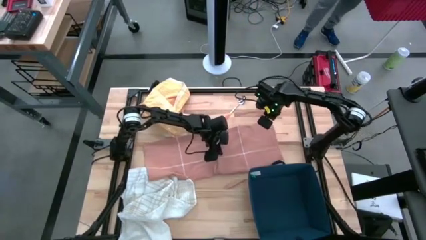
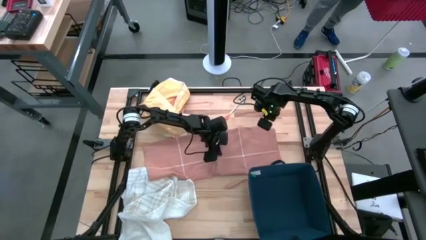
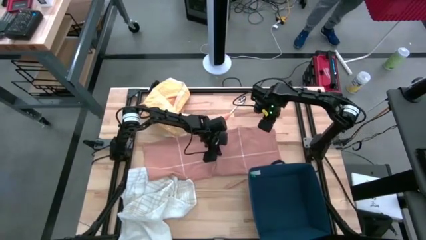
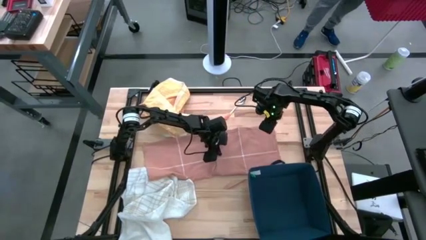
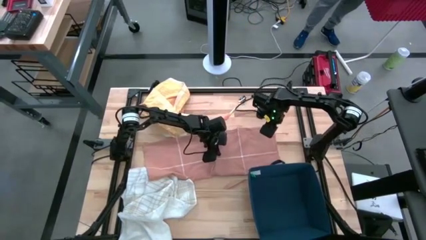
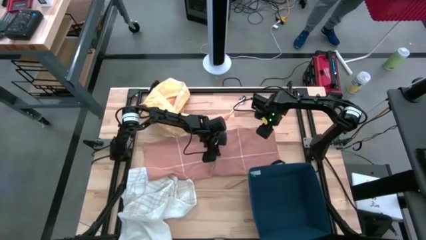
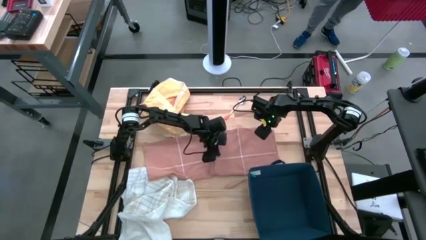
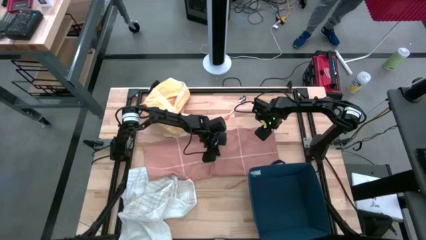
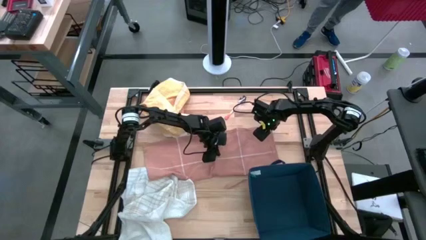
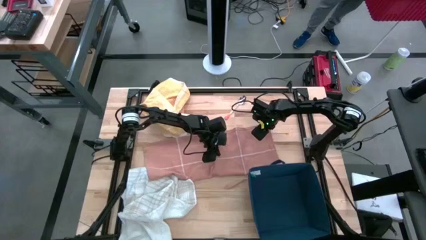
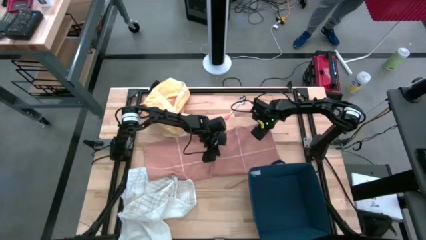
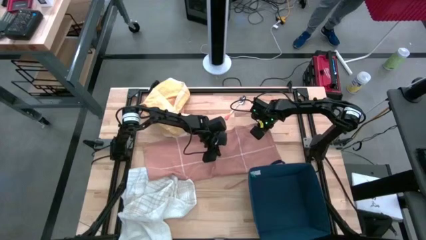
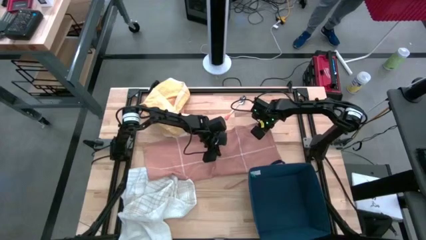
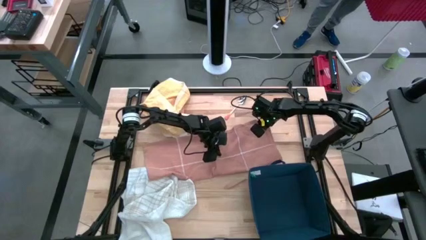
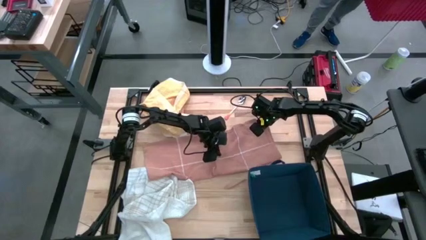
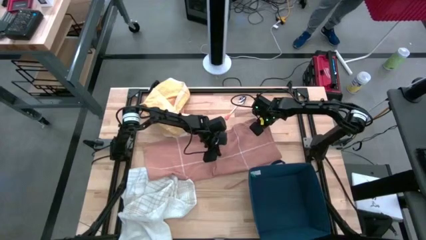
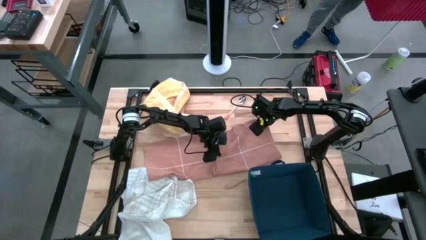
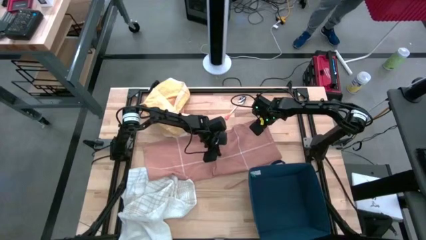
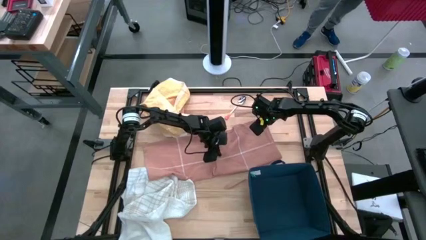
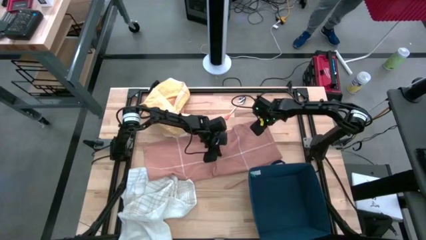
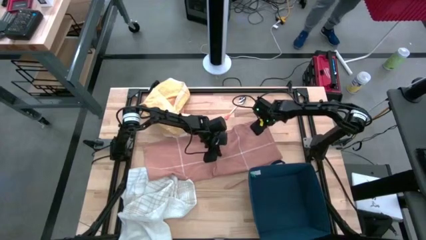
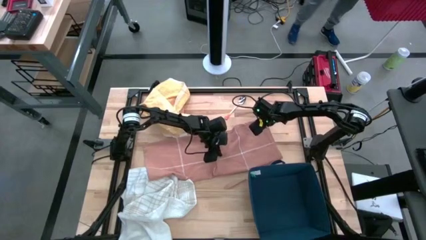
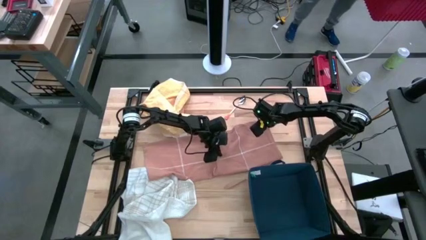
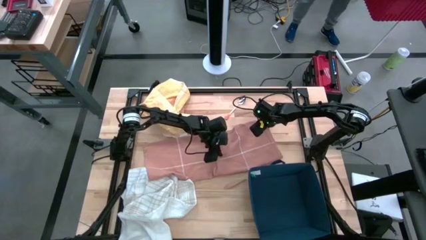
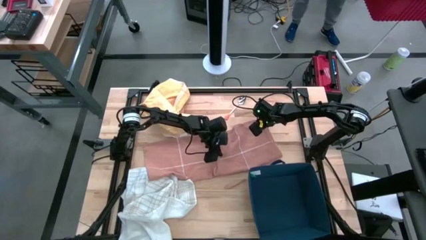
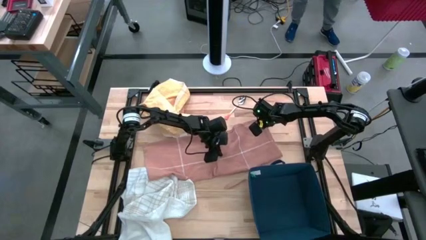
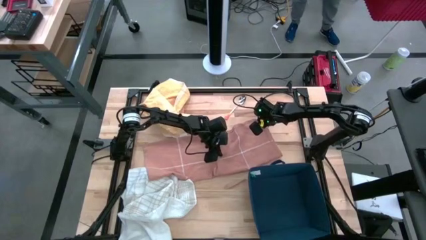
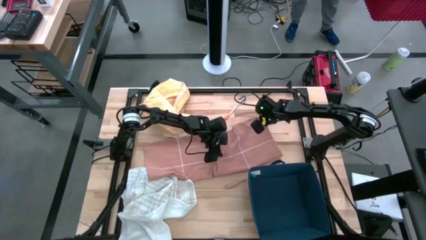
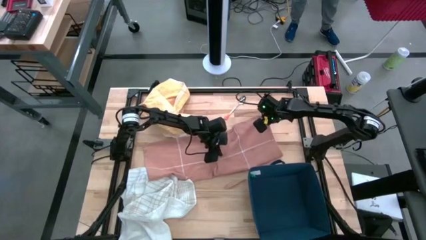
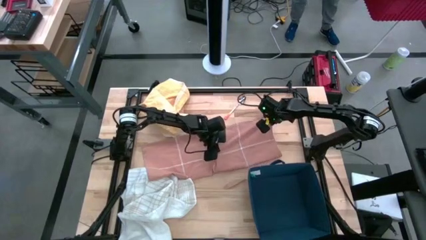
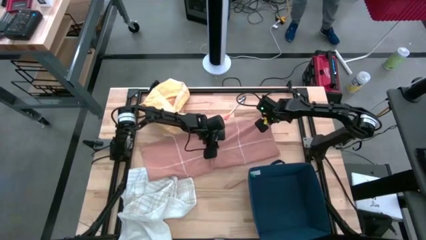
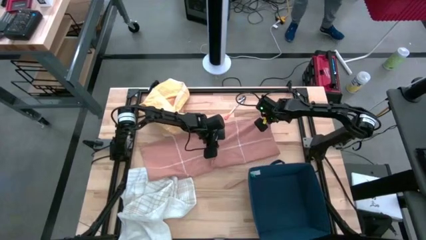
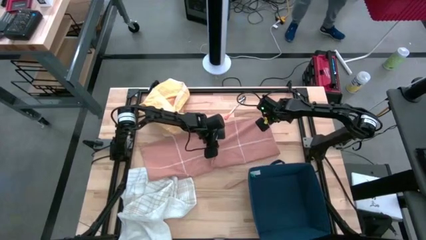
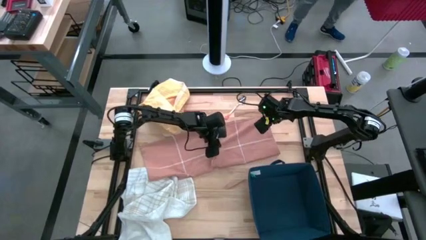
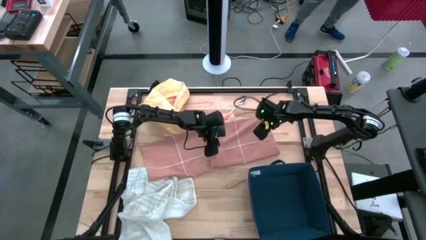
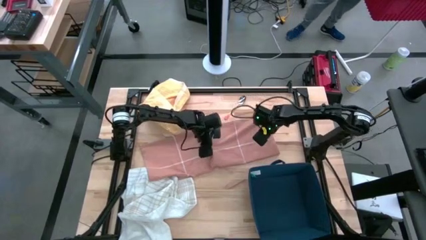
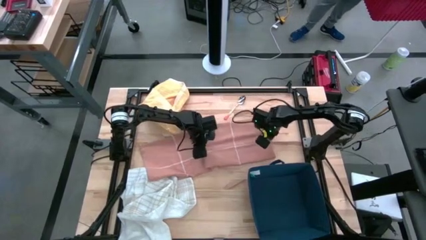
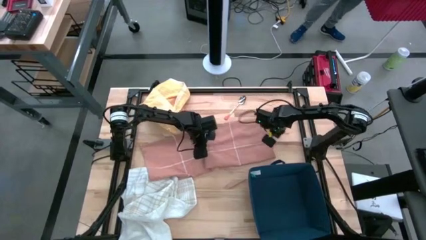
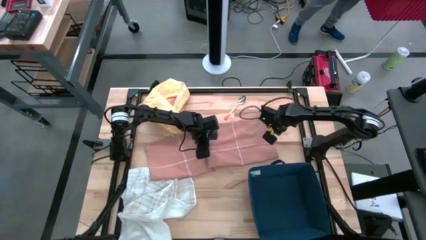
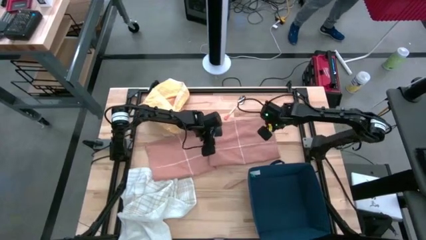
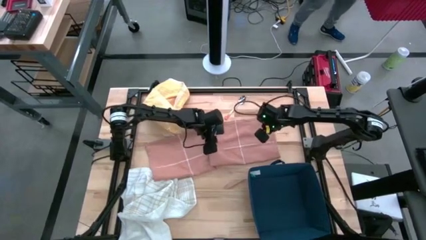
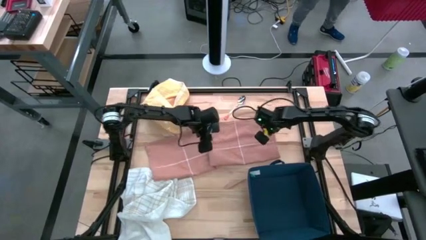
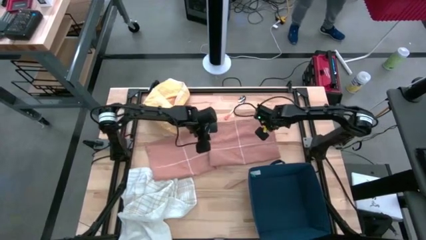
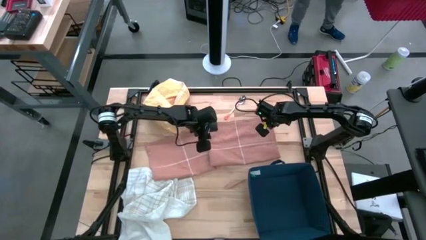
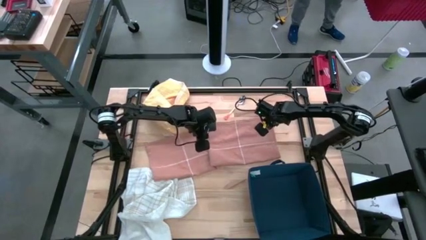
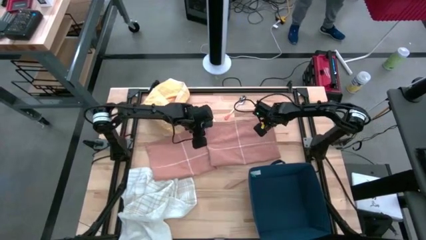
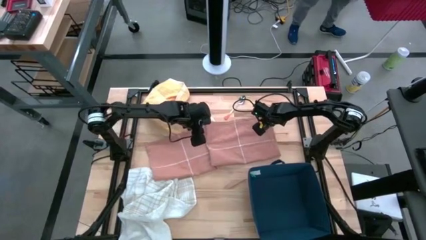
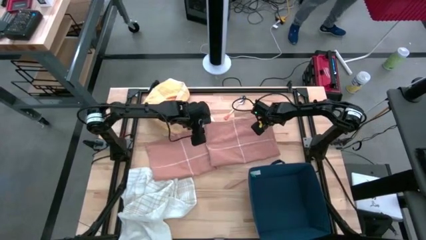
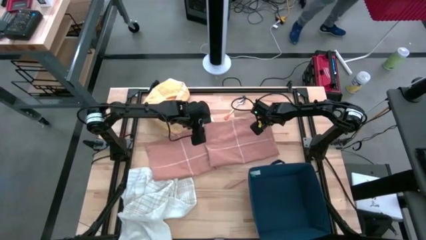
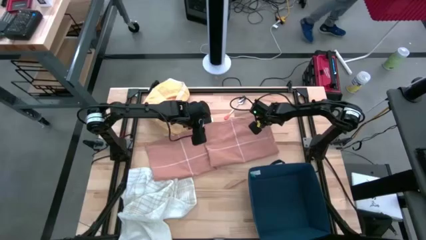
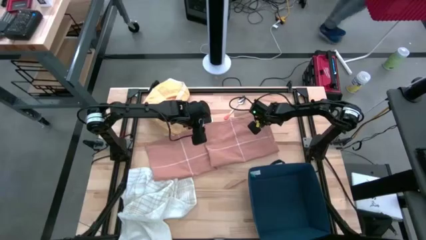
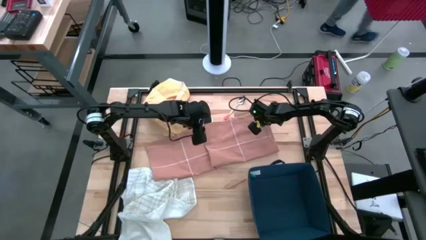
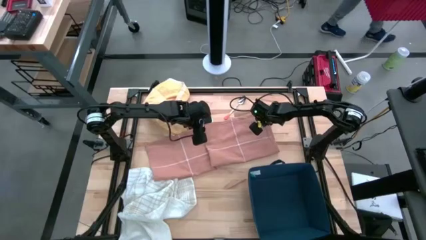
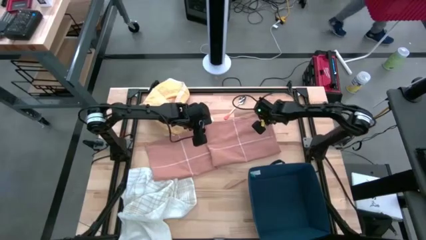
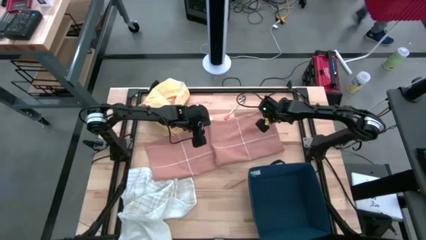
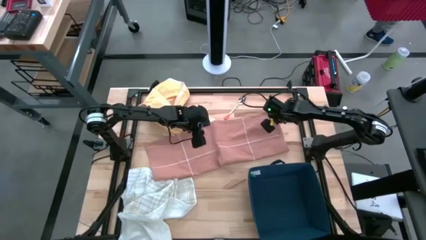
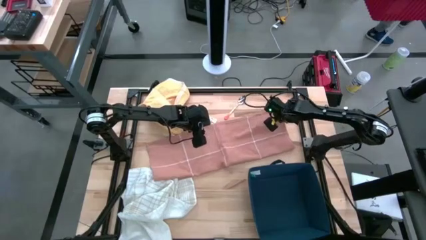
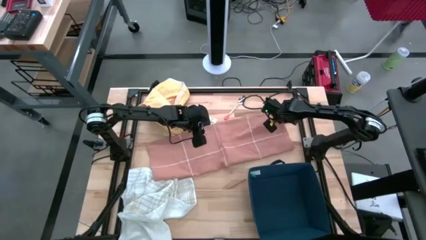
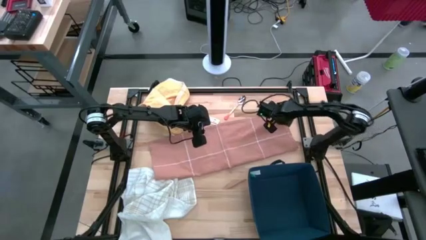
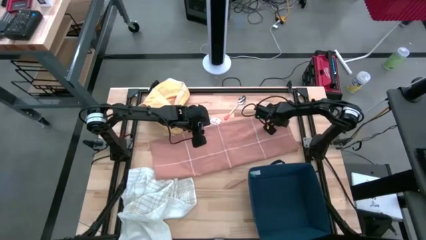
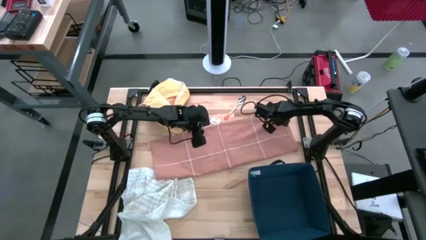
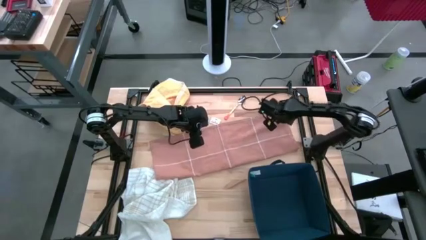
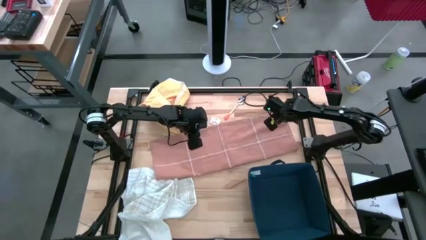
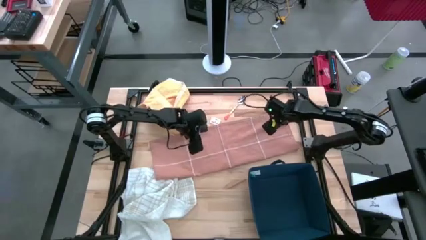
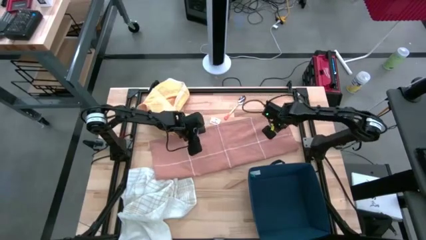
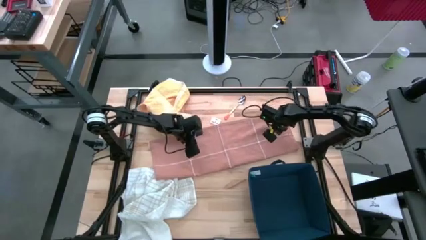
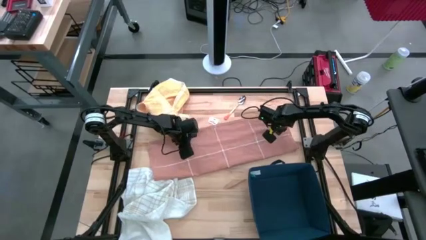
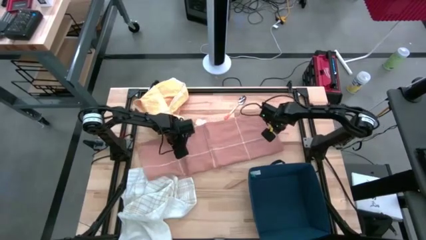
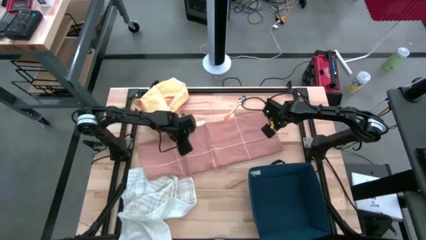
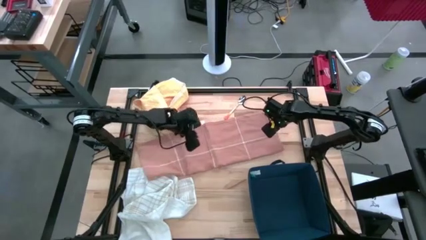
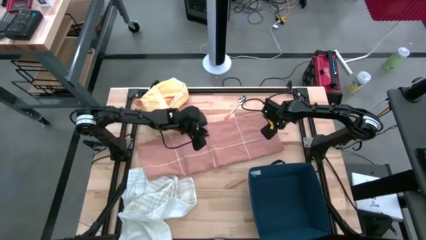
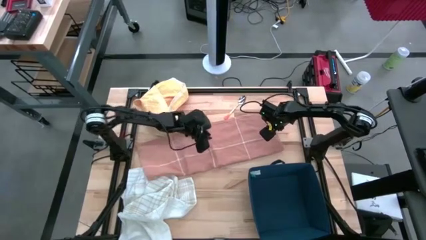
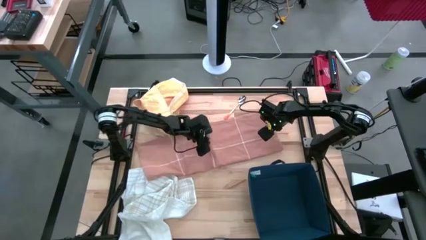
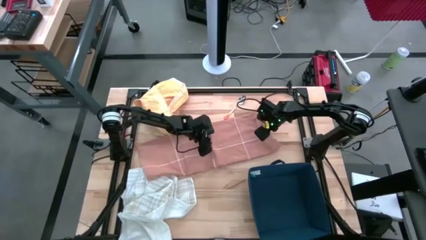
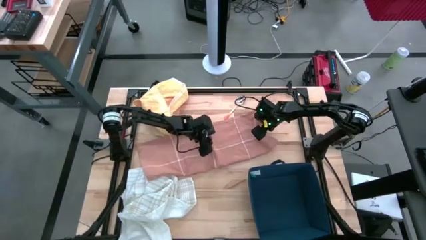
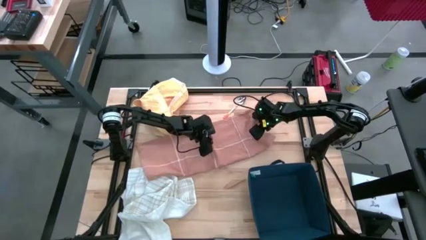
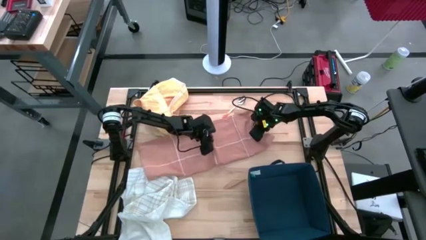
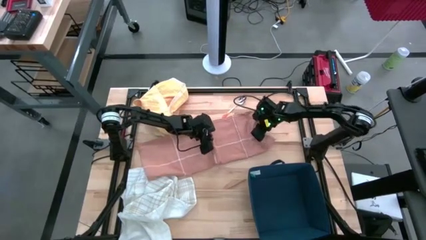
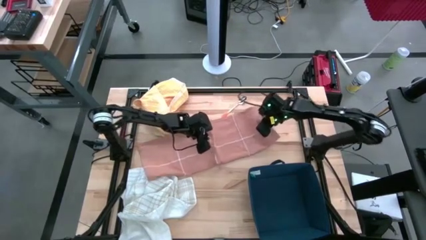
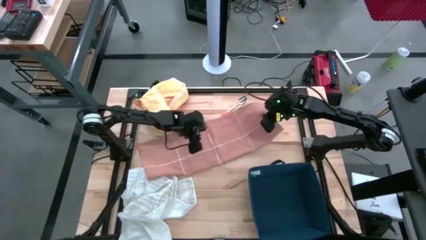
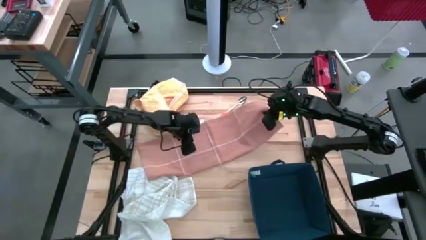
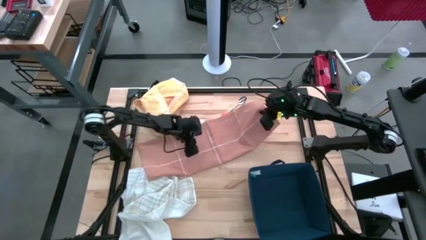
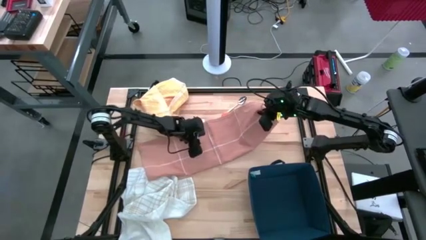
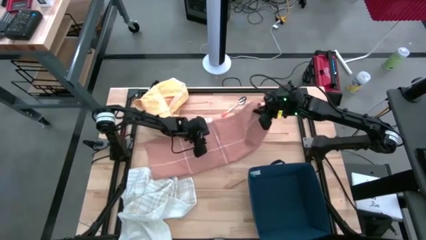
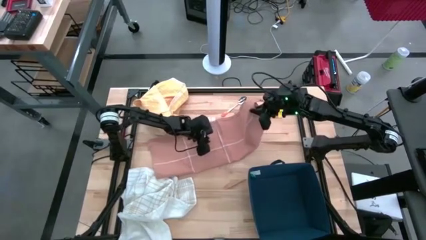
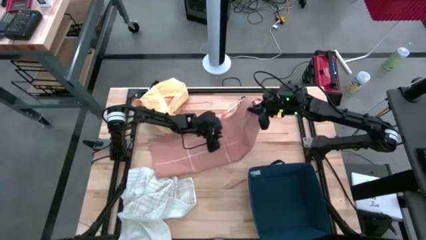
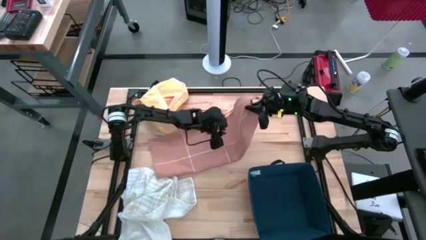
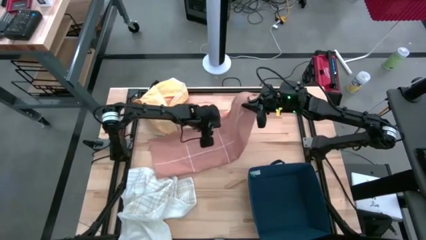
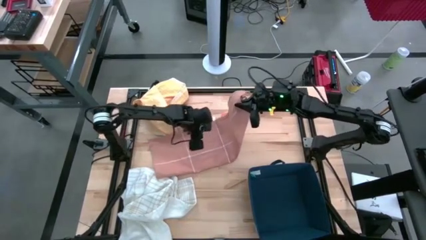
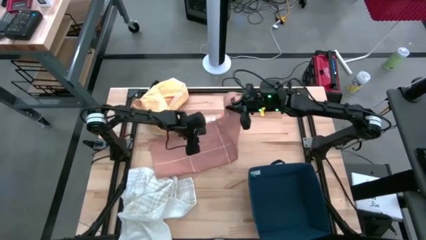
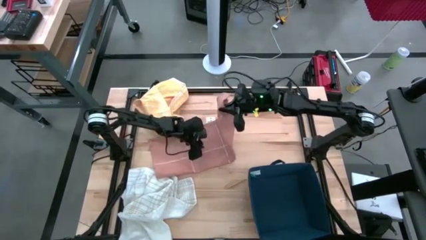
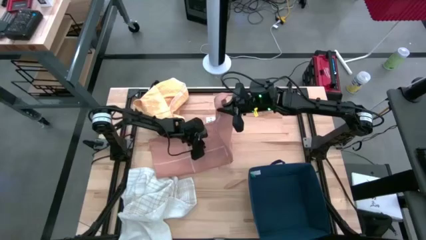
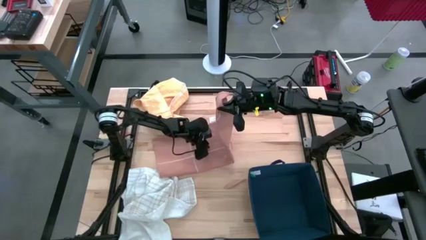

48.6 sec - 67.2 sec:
Task: Fold towel
Fold the brown towel
